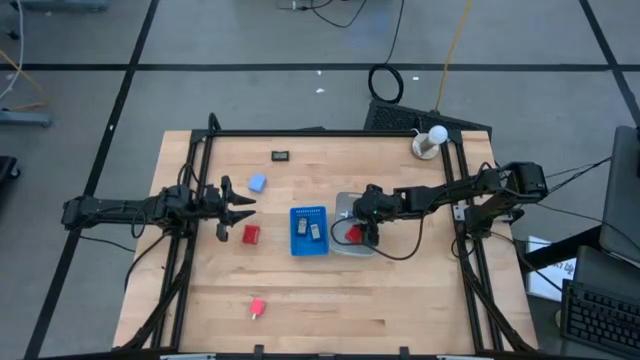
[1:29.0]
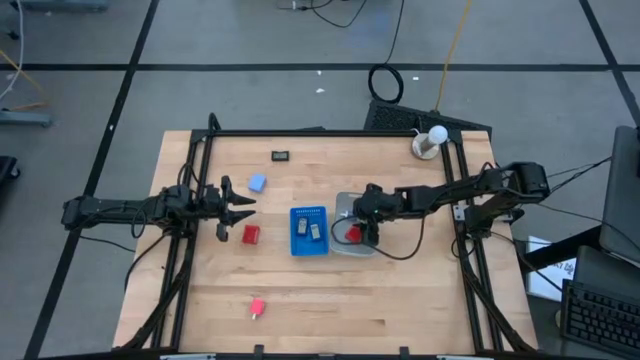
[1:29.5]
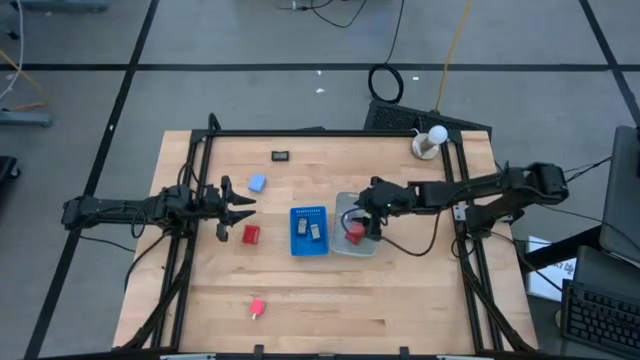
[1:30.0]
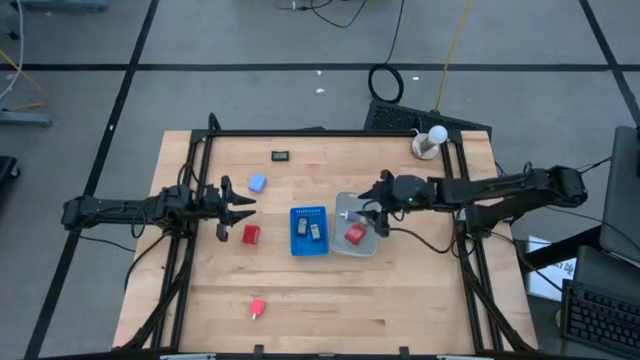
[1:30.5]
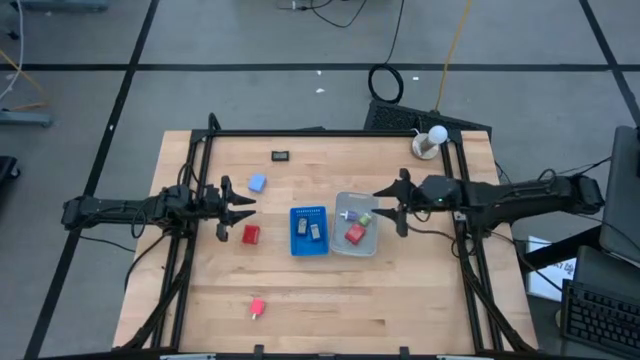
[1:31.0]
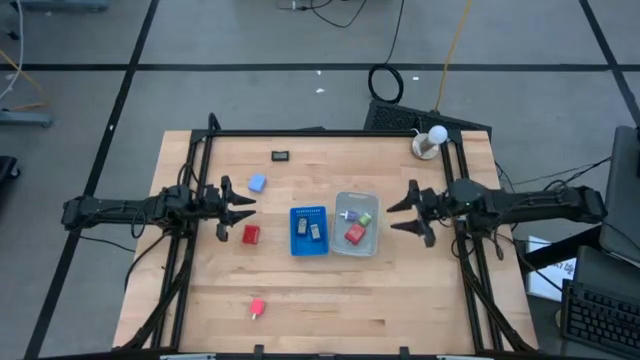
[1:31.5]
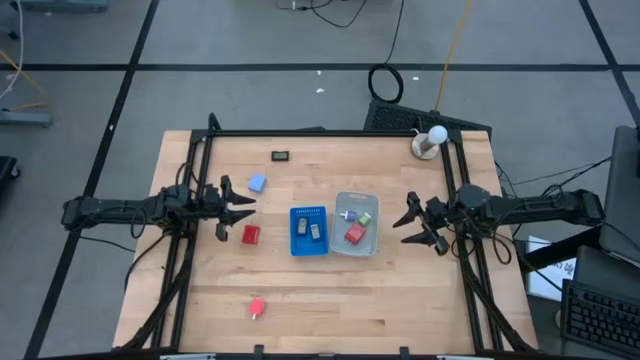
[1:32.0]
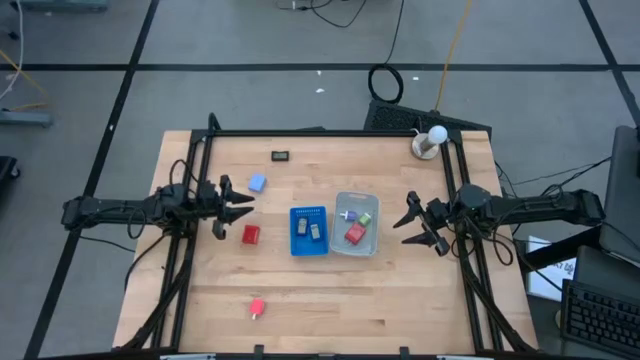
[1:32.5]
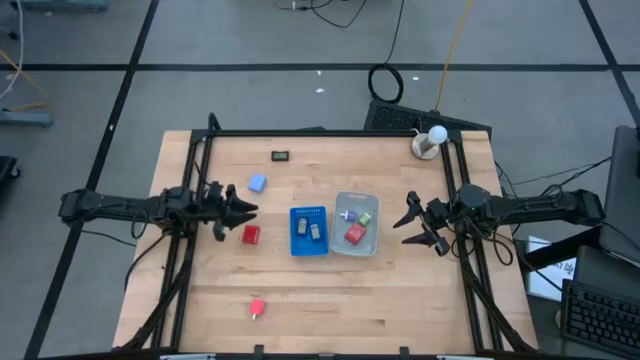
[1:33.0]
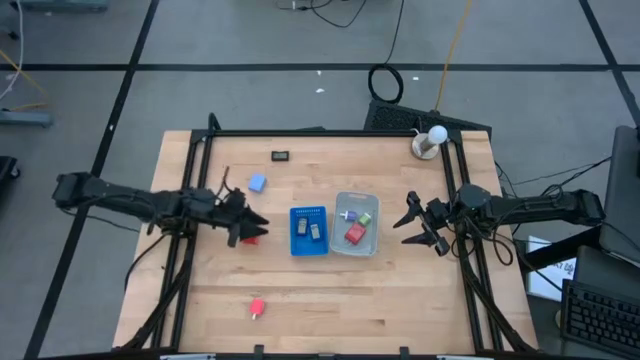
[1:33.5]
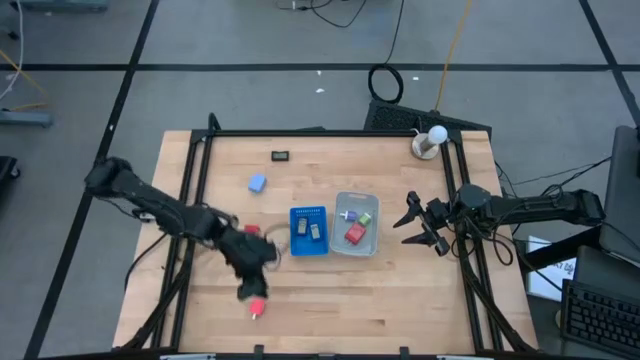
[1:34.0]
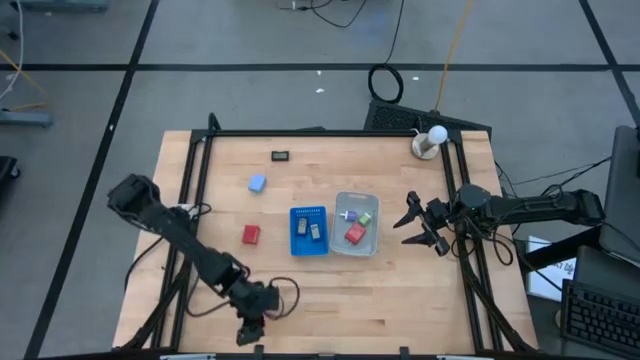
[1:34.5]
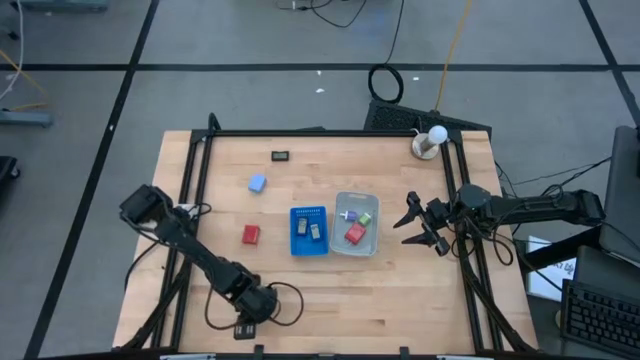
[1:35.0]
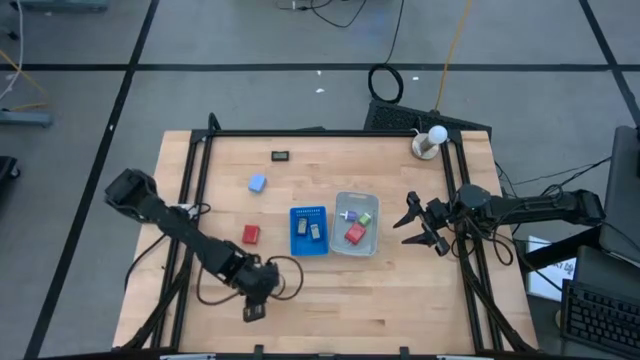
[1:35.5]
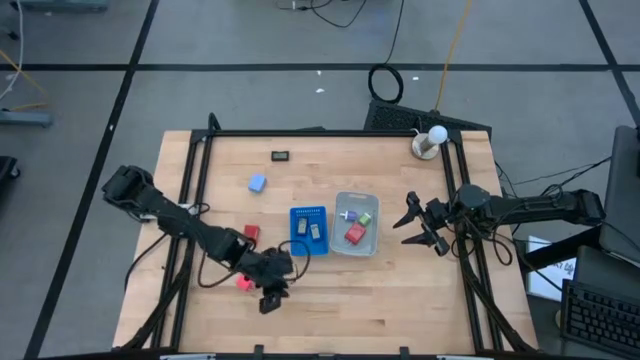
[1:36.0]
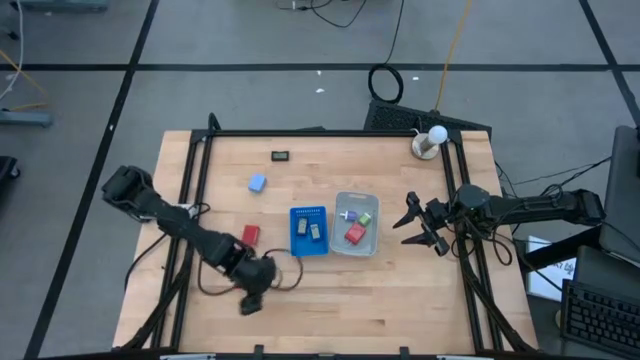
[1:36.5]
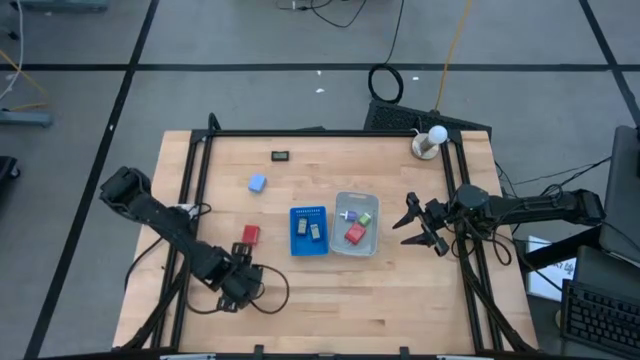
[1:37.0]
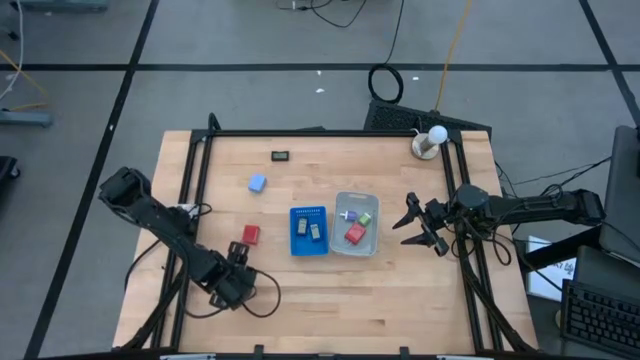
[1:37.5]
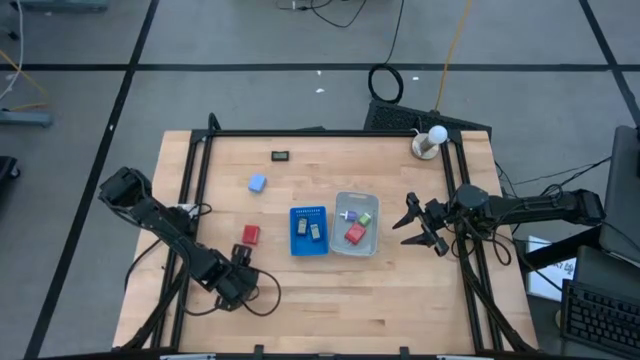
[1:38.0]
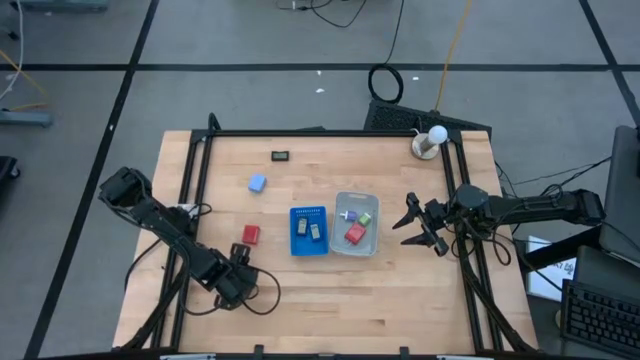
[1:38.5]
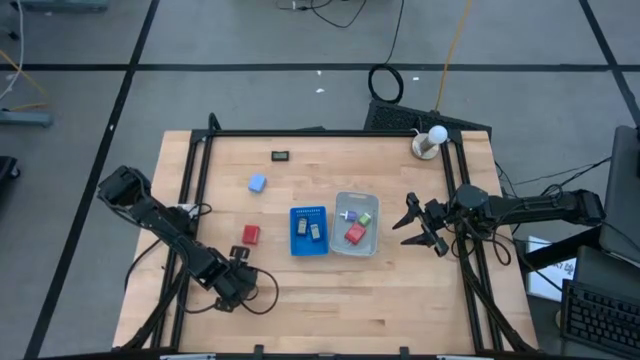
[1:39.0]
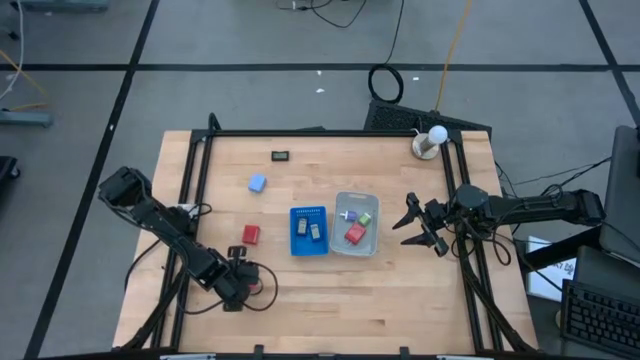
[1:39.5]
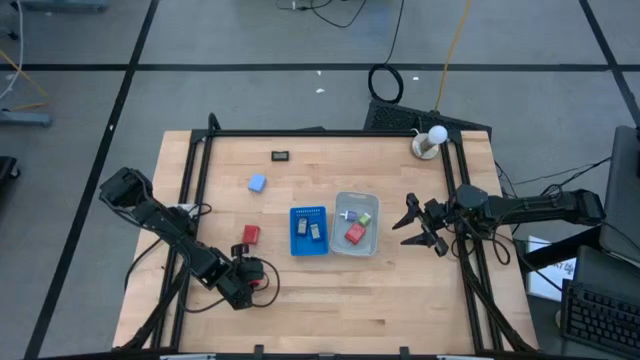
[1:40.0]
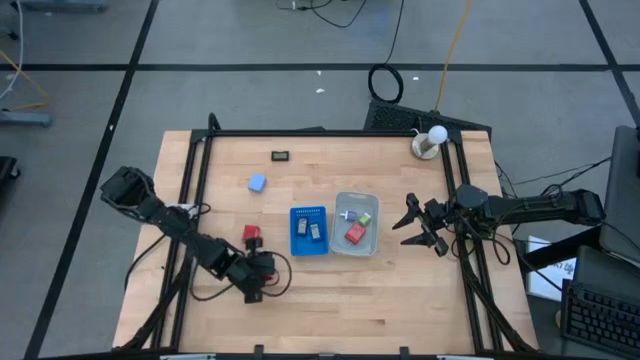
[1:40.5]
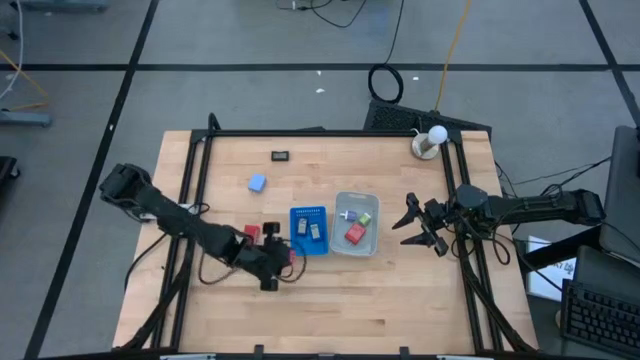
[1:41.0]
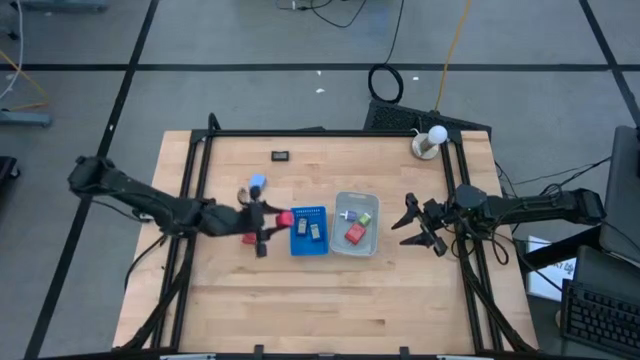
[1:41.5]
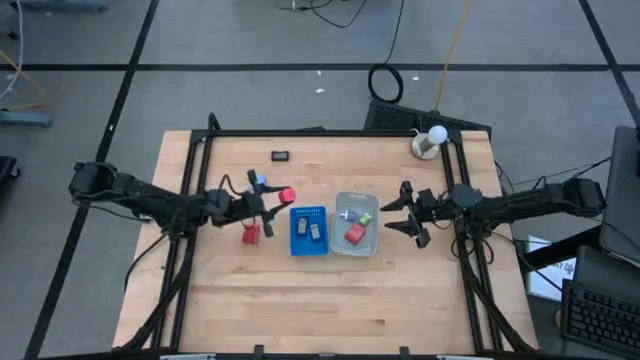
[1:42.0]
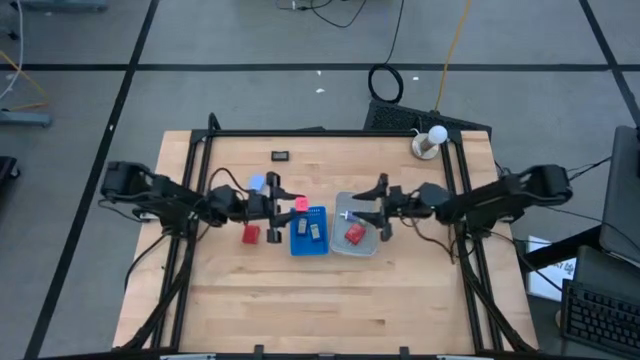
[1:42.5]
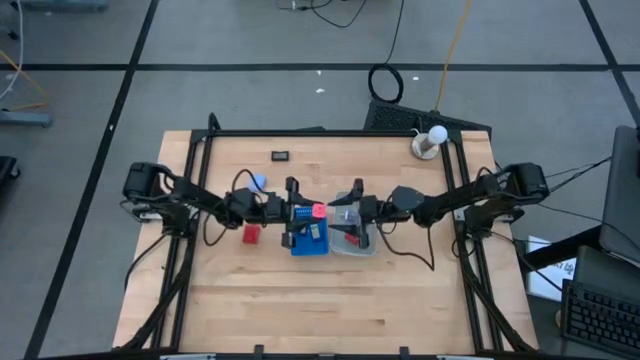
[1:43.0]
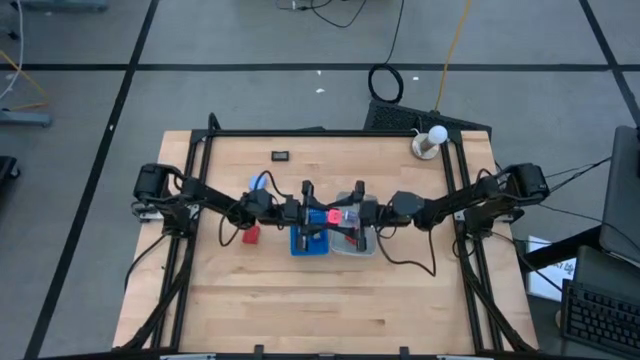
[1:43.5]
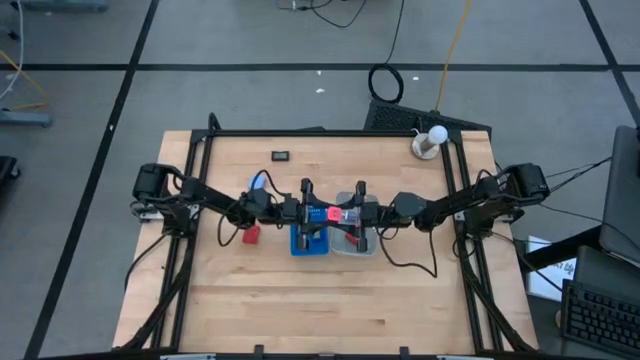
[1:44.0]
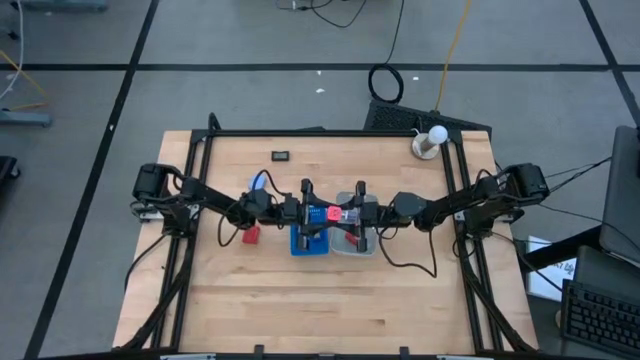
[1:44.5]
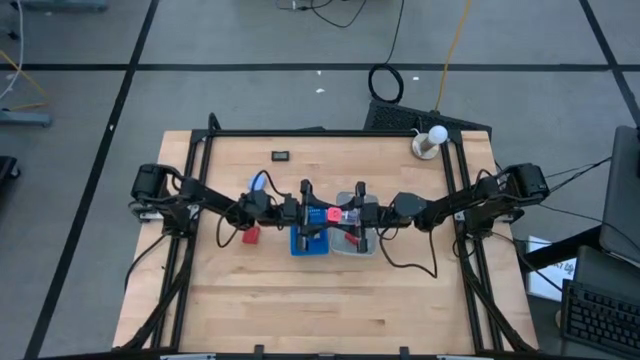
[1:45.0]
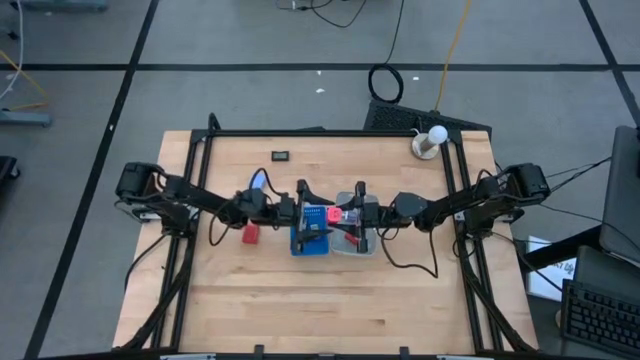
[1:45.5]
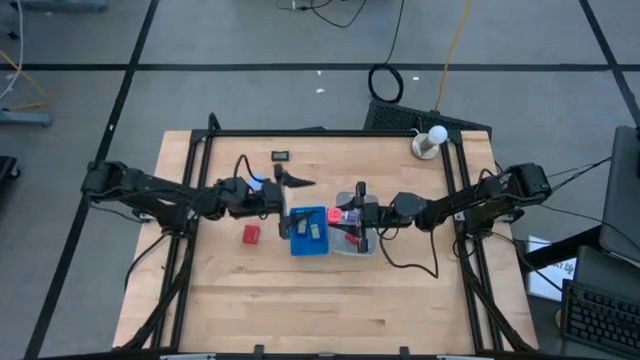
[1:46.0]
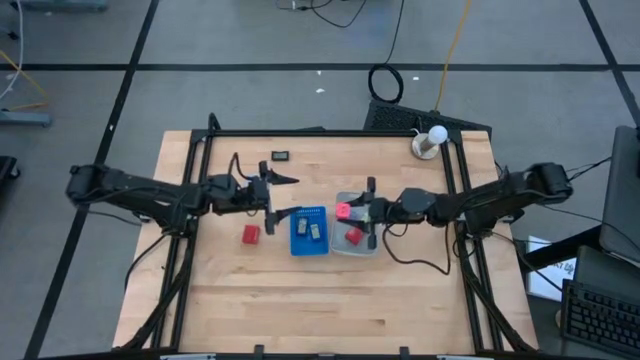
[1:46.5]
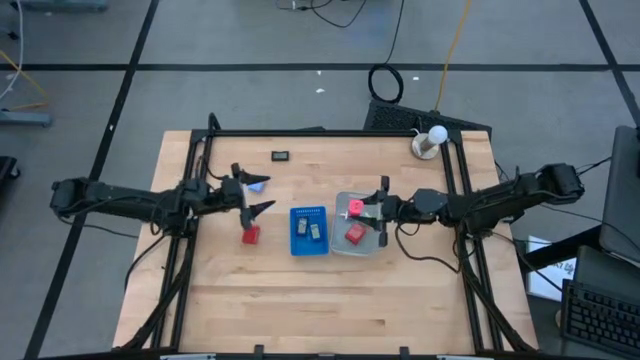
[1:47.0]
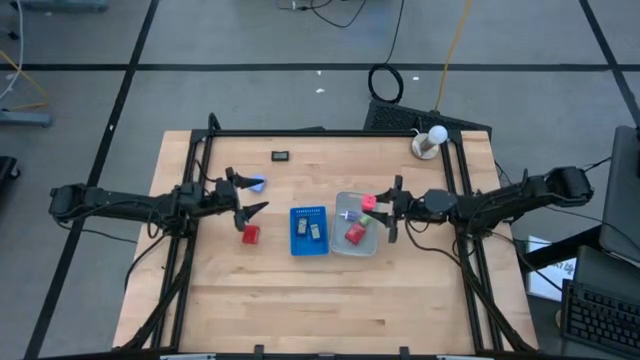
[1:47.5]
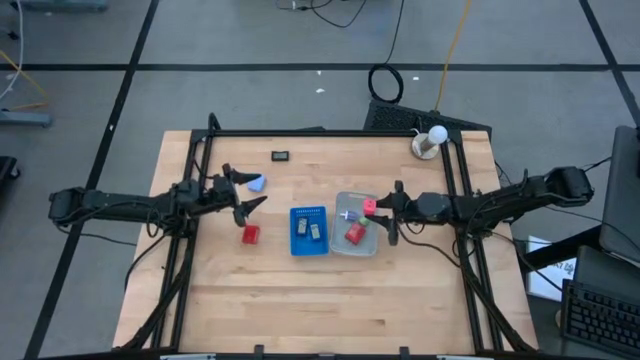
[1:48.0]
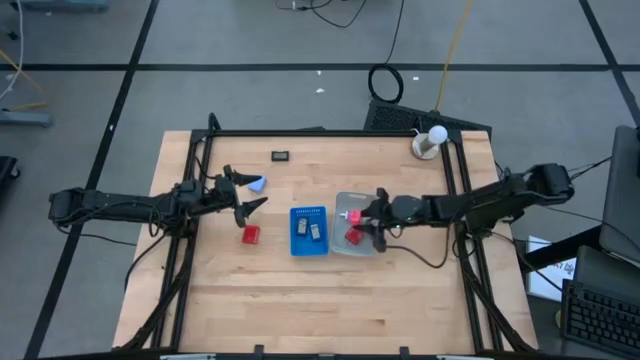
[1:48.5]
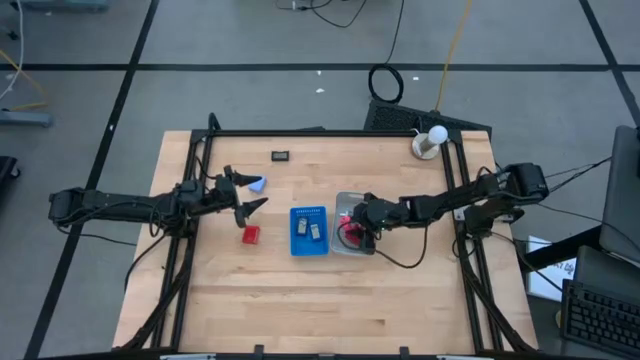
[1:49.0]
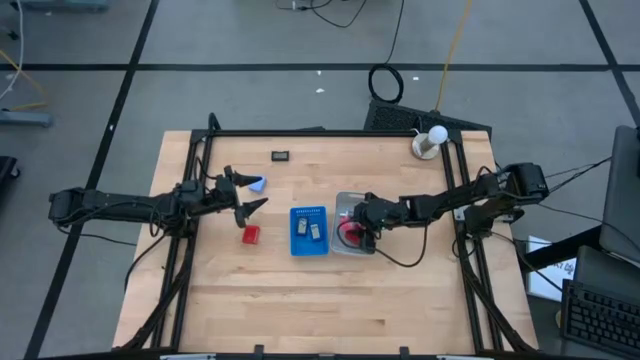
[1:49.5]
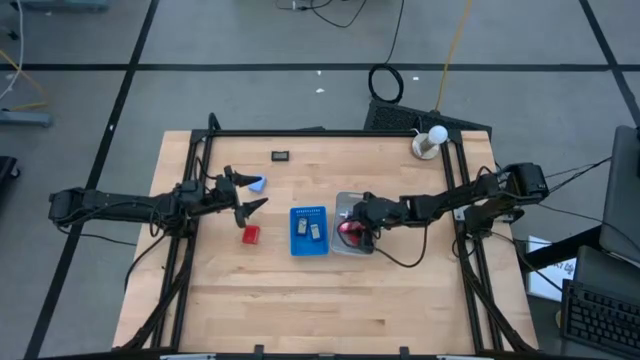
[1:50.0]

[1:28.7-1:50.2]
Task: Pick & Place Office items
Put the pink charger adapter into the gray bin
